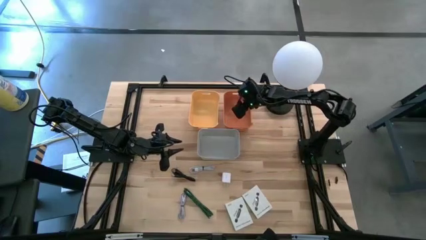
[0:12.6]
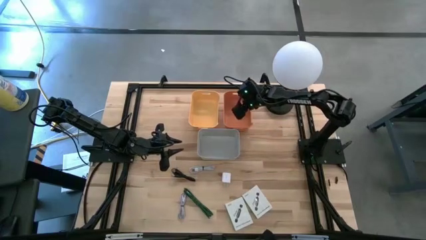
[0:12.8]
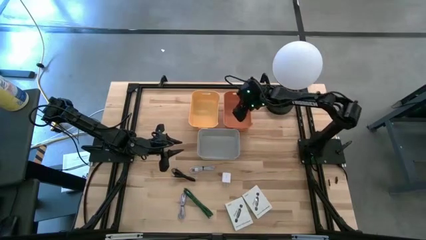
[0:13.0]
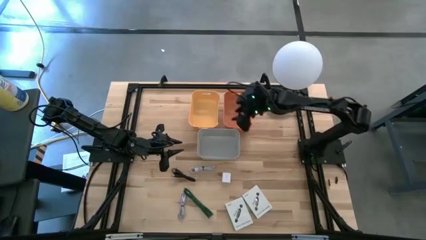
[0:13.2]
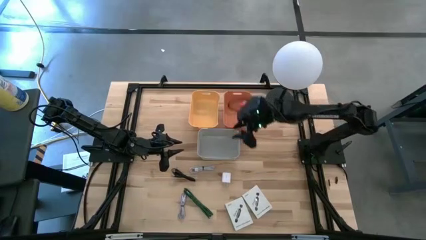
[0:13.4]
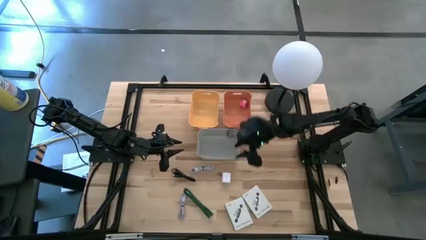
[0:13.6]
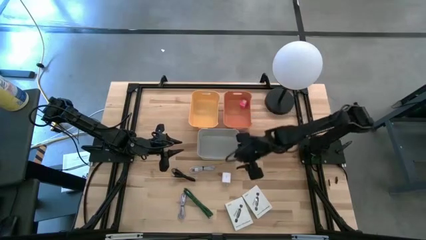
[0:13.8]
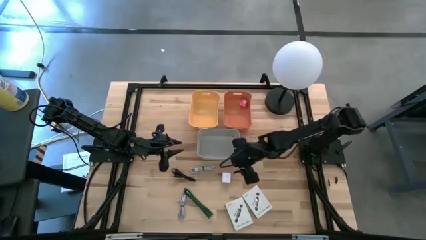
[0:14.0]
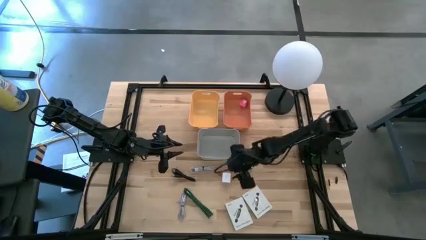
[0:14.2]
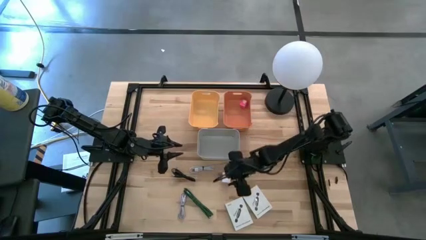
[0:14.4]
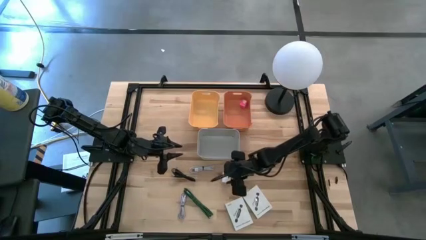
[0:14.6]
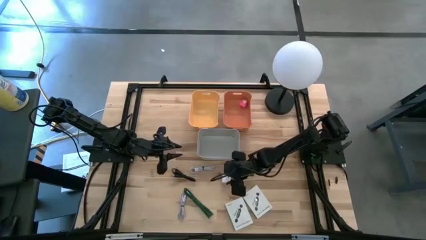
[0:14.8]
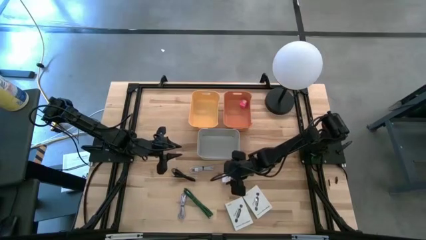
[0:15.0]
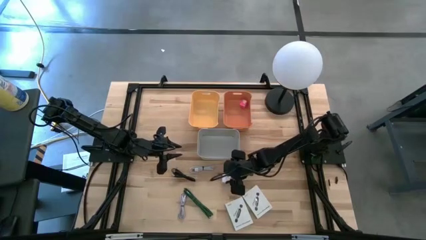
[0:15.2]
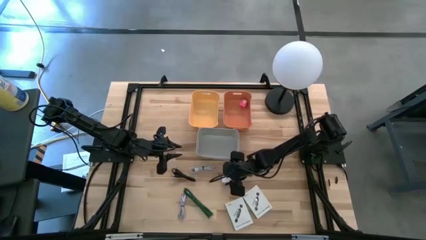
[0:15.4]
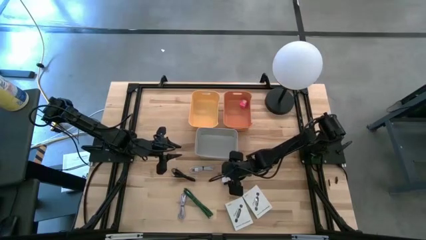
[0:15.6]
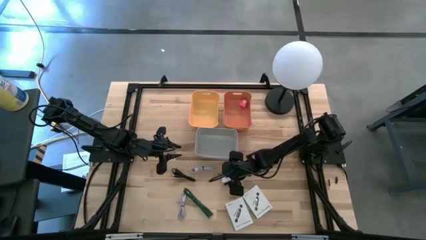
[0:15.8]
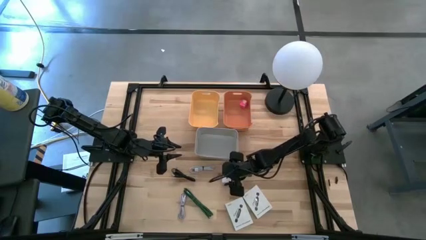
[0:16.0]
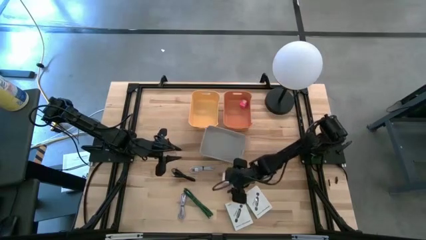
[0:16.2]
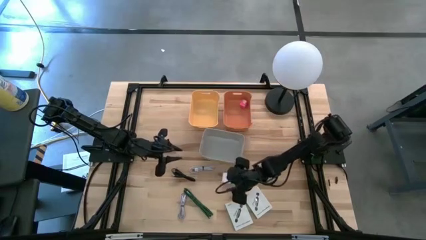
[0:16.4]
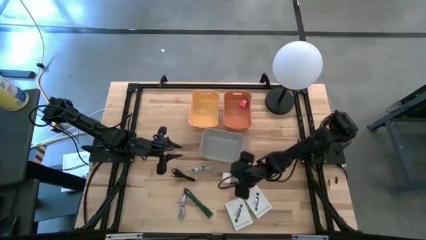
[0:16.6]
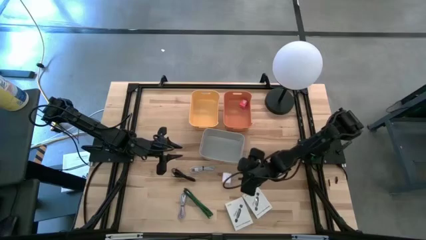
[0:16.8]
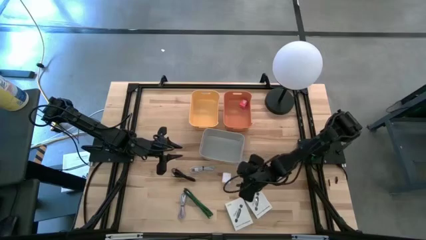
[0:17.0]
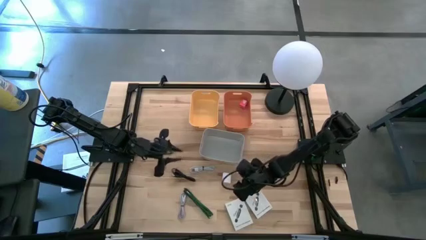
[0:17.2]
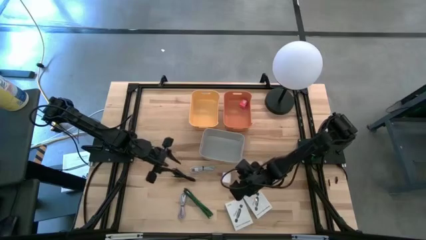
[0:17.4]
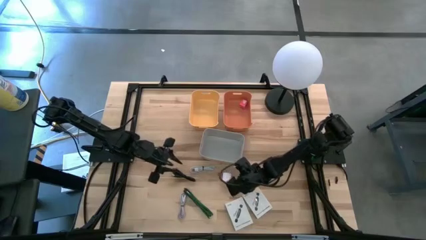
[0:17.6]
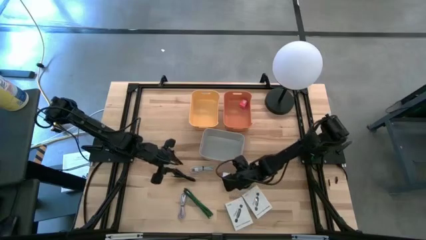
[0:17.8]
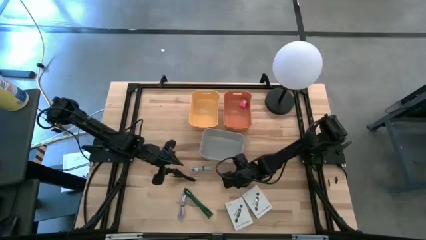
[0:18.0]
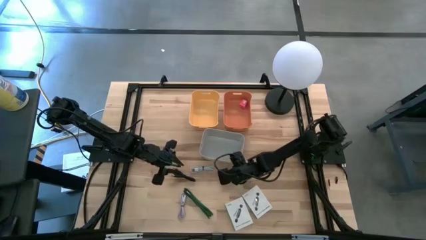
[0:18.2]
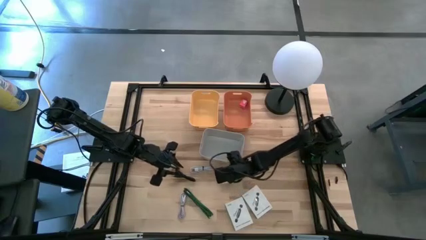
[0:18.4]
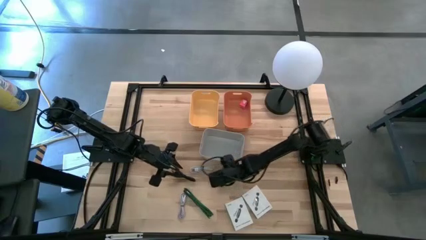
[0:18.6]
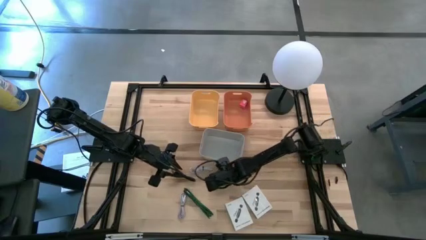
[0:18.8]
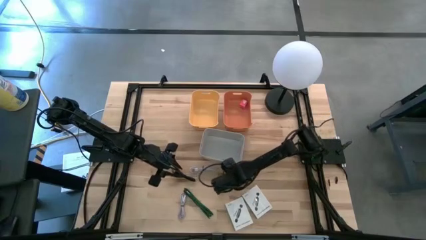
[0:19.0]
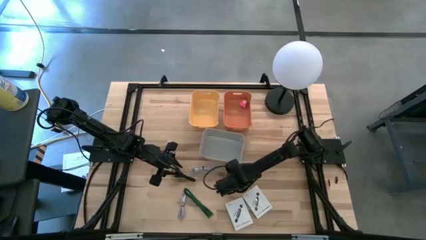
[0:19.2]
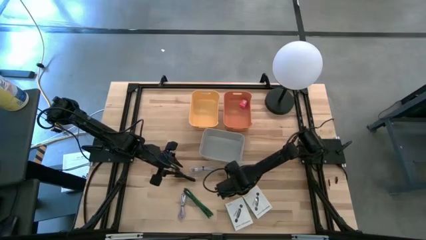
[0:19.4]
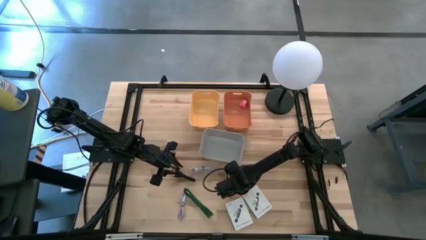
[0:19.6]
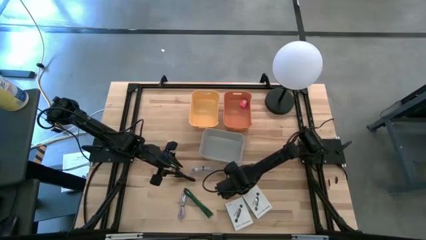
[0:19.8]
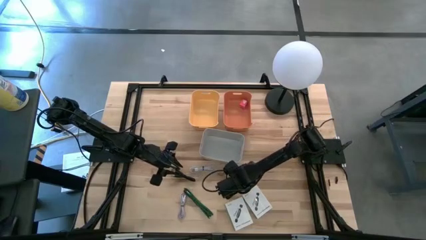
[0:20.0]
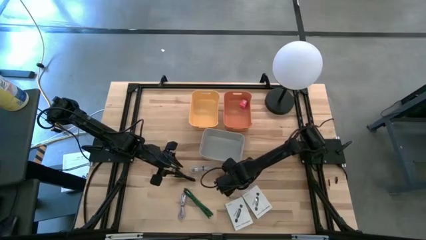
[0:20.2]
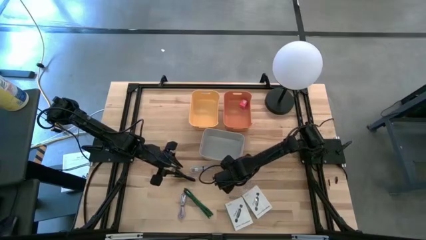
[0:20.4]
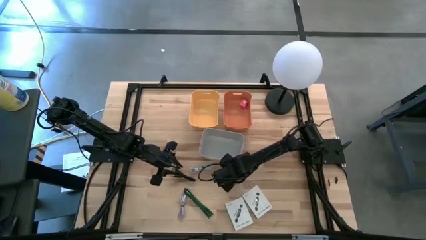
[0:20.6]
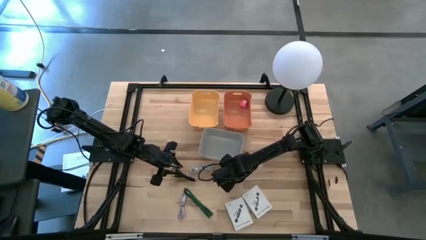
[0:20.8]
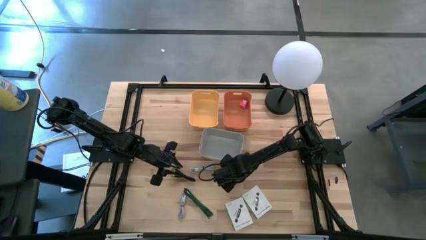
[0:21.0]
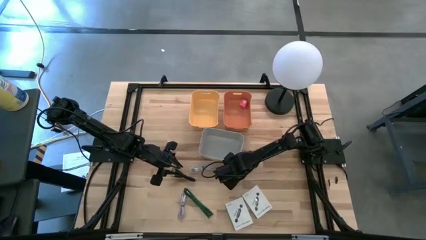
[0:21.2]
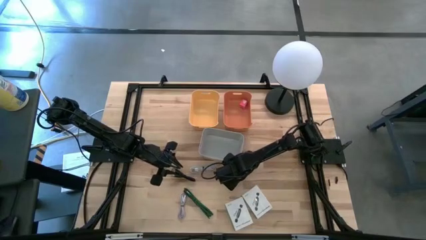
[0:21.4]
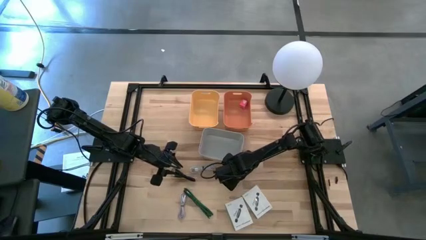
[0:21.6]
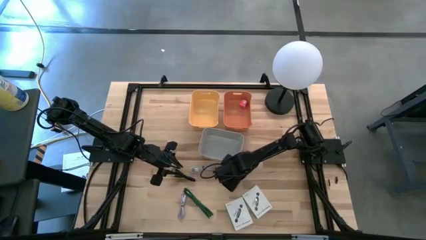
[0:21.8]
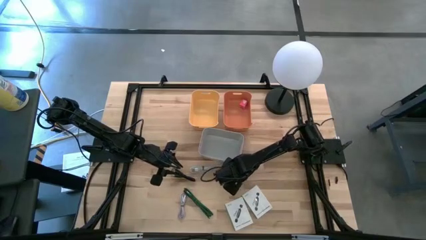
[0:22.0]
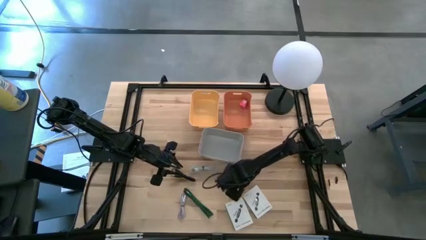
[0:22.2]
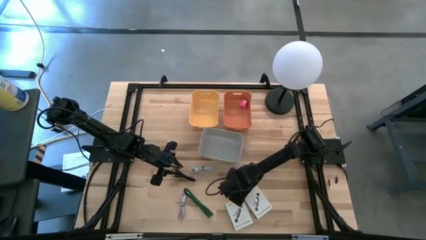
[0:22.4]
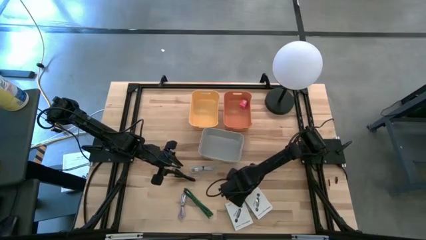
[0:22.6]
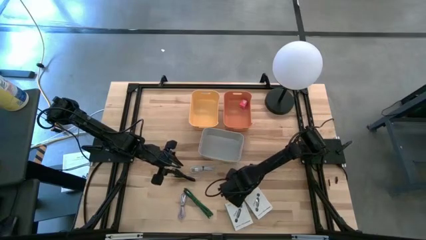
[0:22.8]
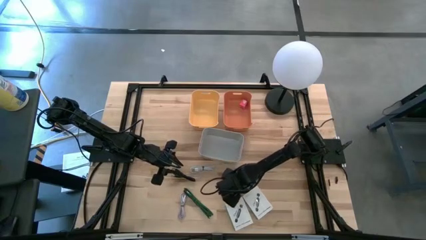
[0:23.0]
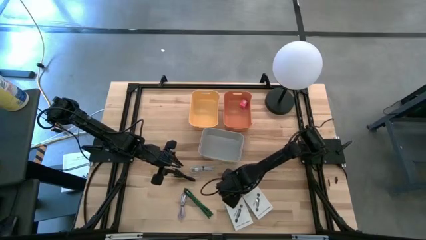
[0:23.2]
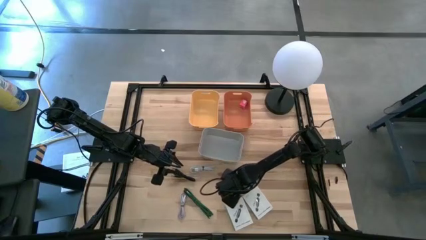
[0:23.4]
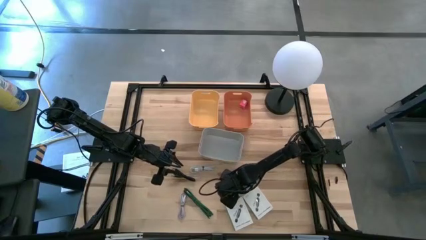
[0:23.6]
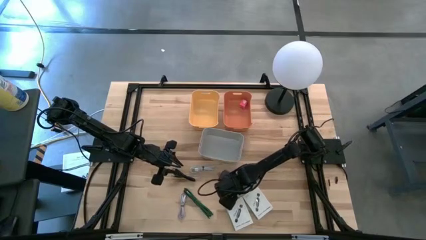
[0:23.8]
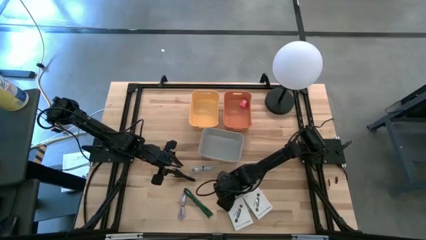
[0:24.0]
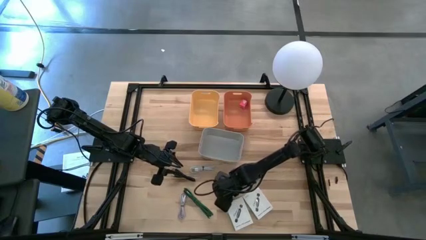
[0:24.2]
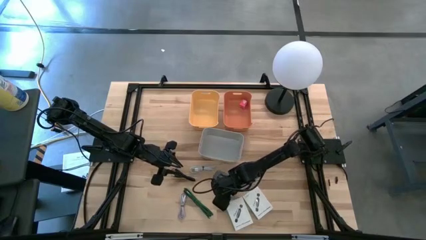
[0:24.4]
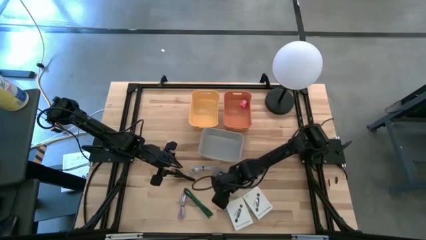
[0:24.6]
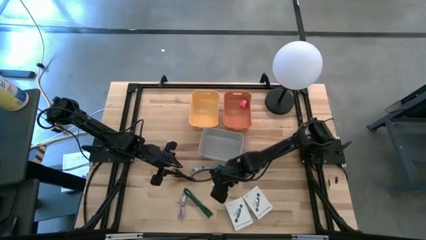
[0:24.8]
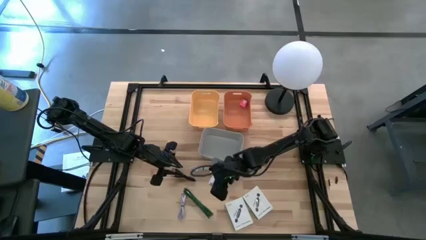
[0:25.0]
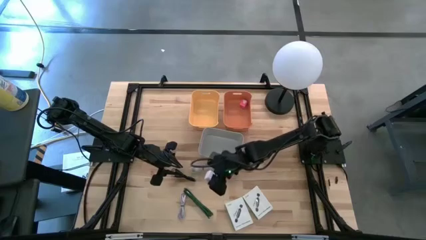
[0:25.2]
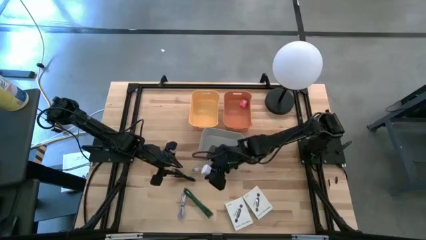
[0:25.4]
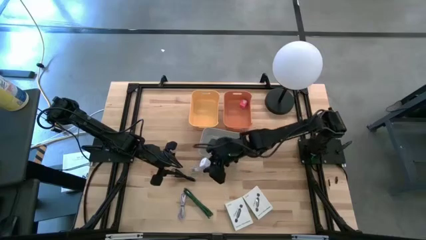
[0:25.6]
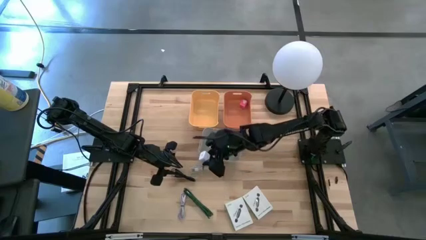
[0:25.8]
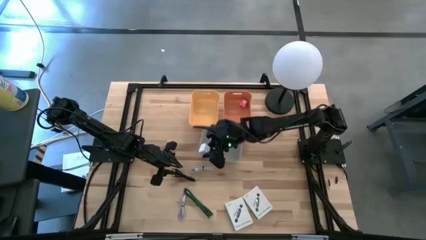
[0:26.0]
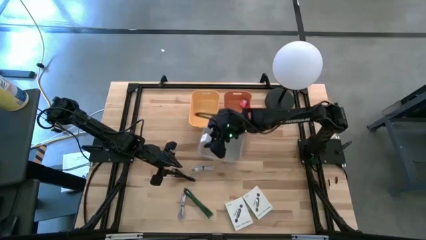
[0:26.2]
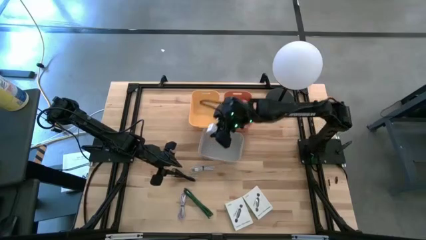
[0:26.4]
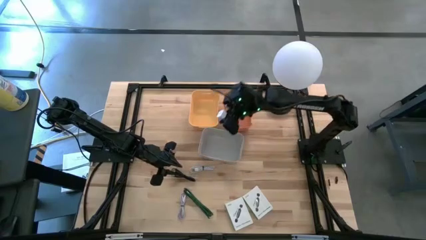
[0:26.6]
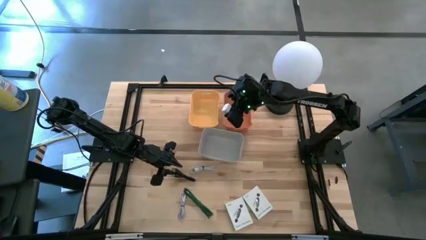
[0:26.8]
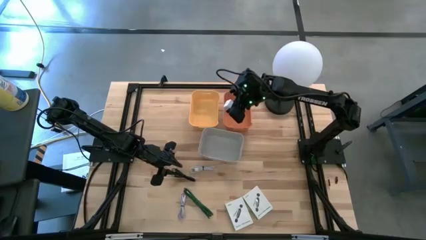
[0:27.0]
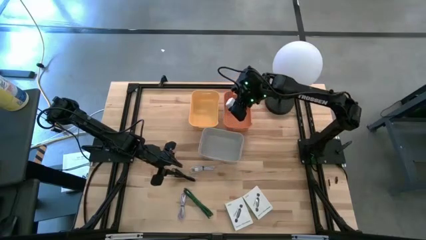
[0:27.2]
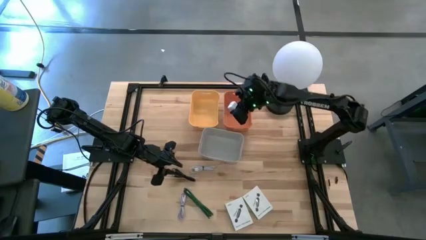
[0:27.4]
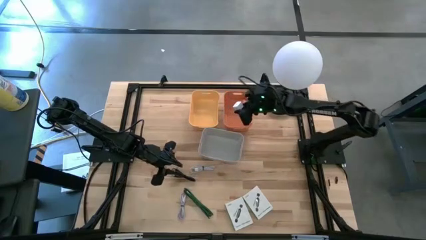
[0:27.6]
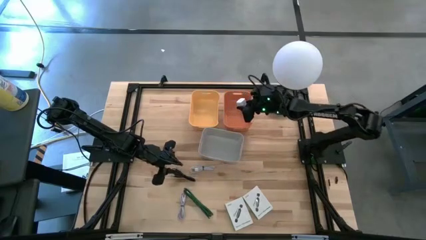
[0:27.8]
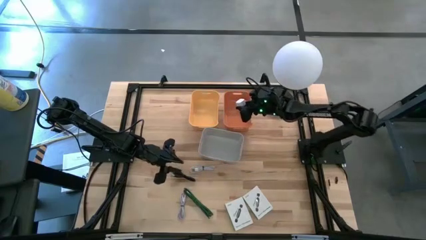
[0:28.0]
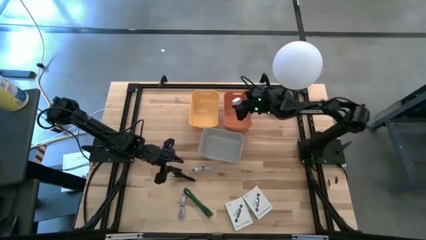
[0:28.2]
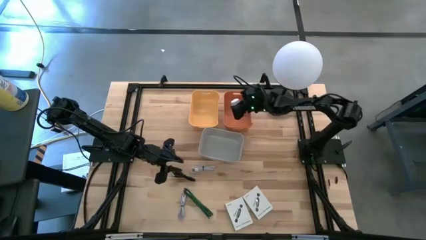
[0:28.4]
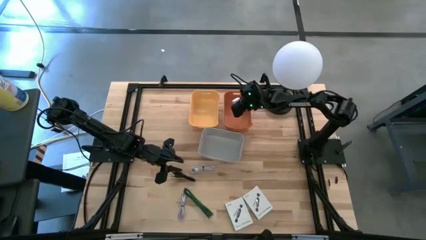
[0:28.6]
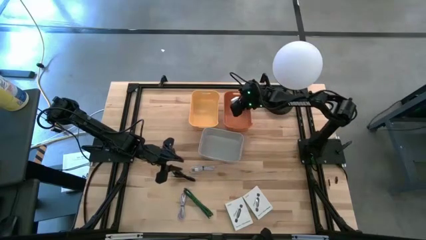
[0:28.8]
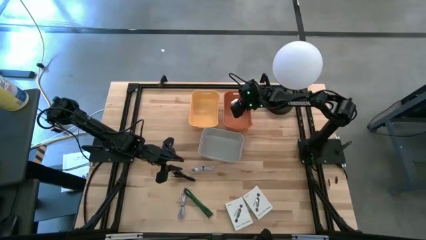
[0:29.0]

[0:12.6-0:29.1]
Task: Pick and place items into bin
Put the white charger adapter into the orange bin
